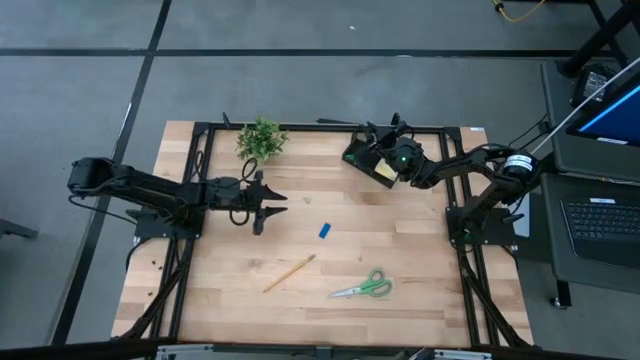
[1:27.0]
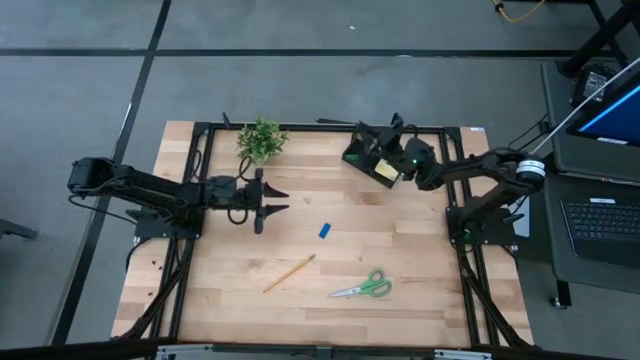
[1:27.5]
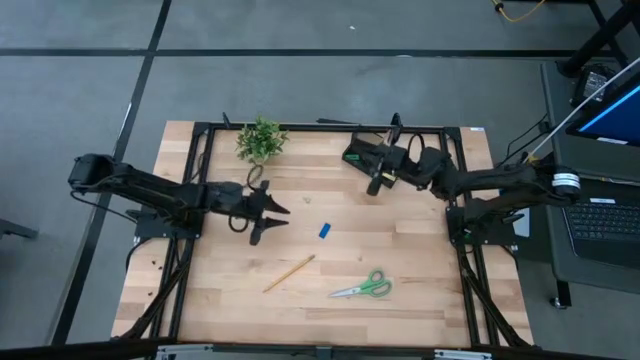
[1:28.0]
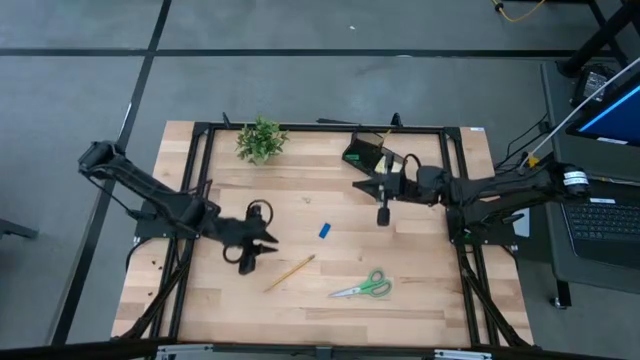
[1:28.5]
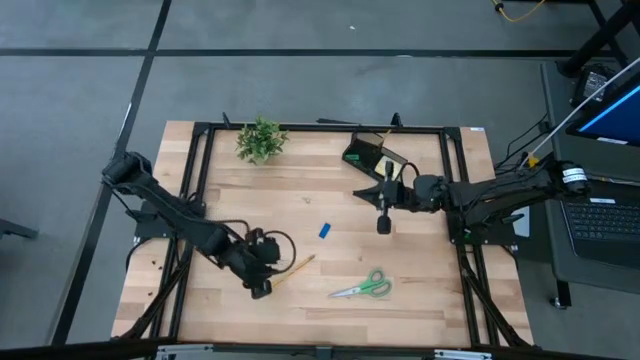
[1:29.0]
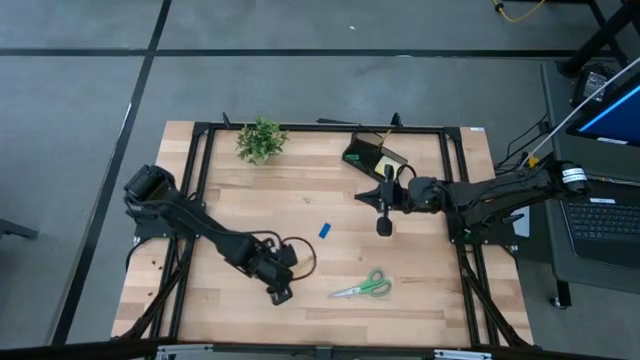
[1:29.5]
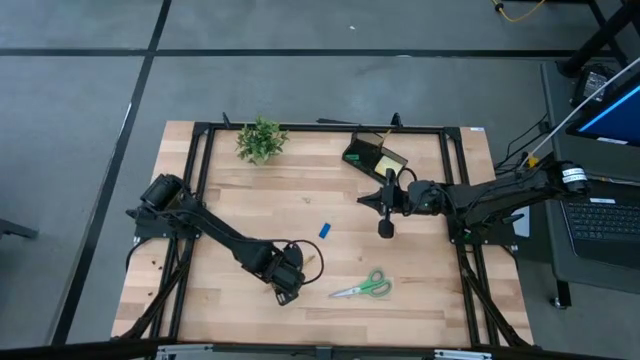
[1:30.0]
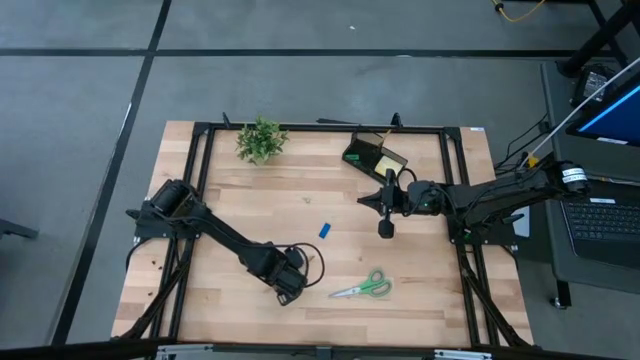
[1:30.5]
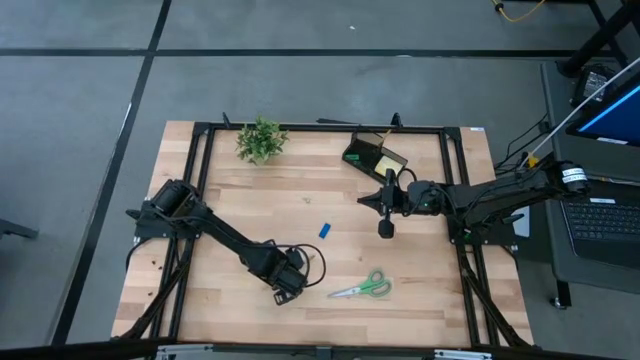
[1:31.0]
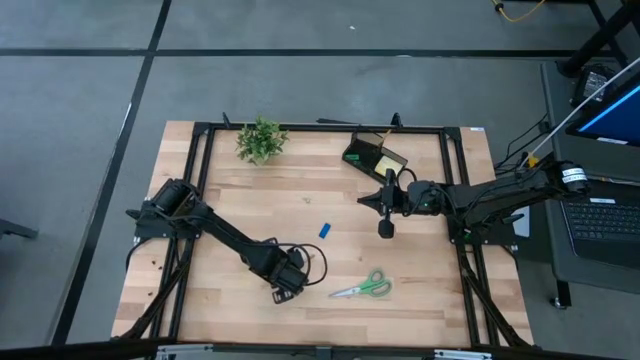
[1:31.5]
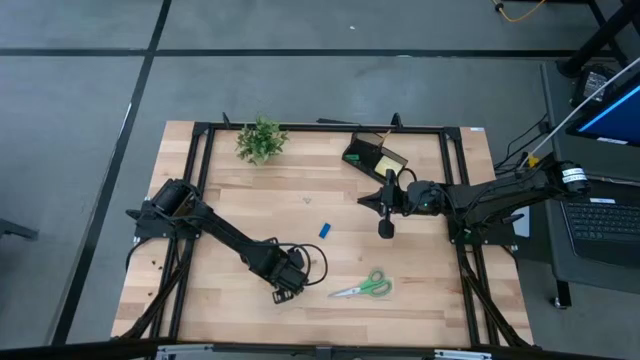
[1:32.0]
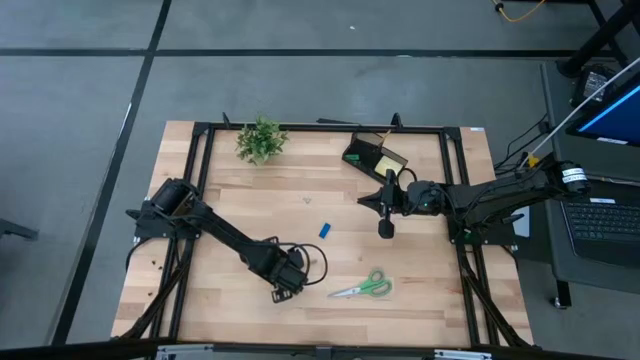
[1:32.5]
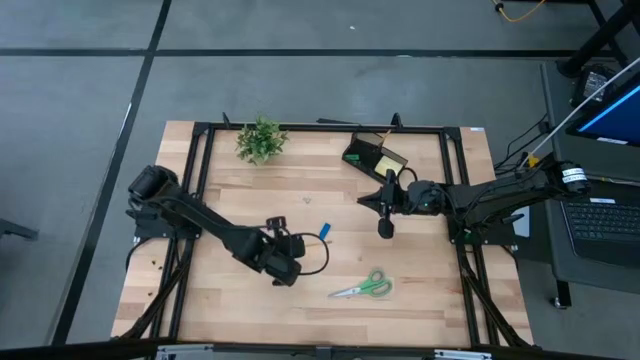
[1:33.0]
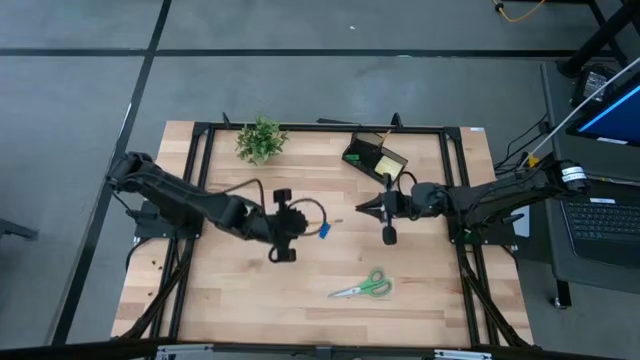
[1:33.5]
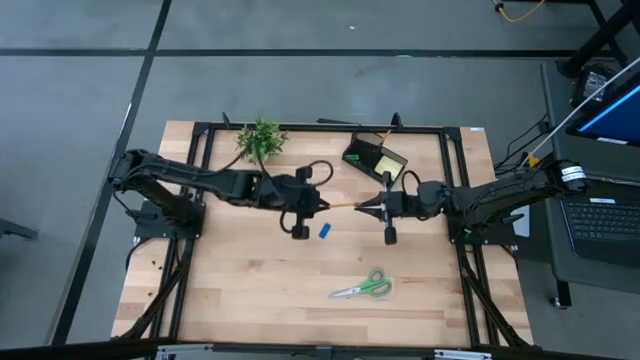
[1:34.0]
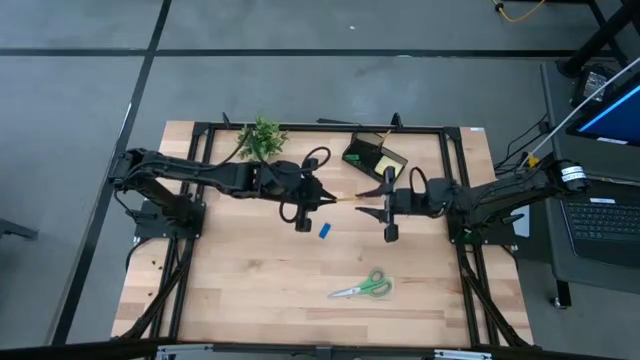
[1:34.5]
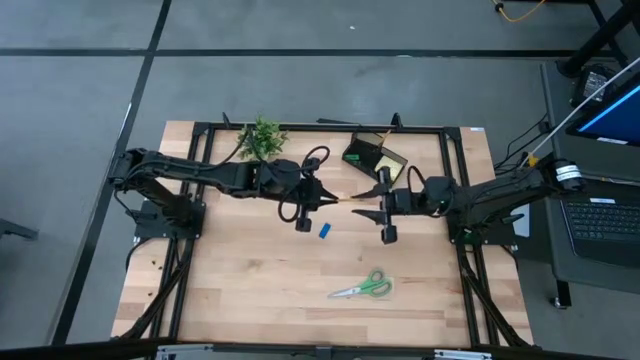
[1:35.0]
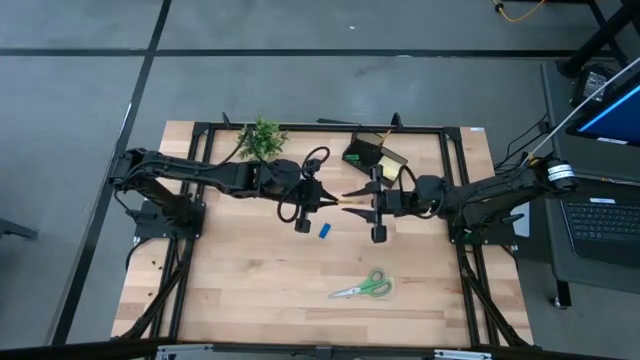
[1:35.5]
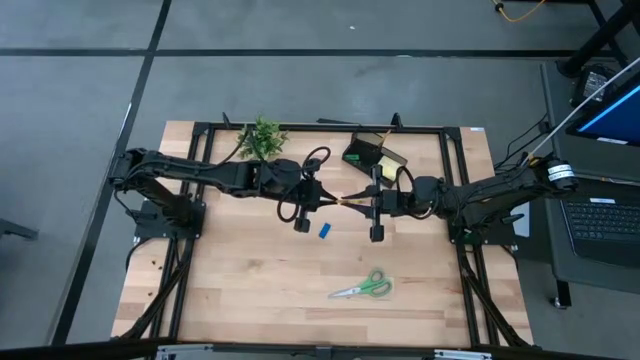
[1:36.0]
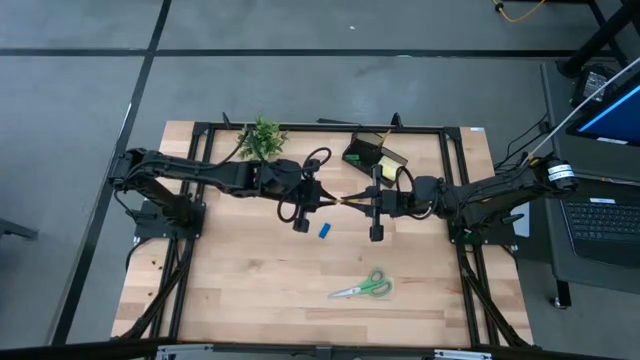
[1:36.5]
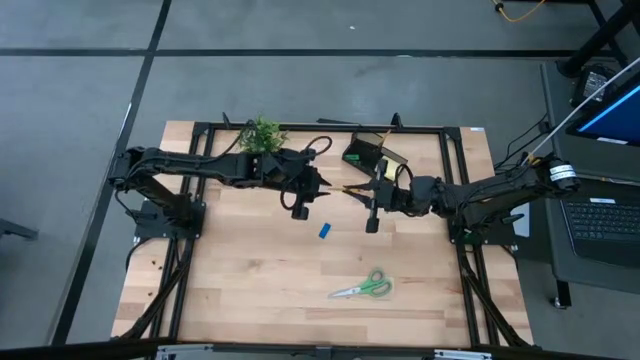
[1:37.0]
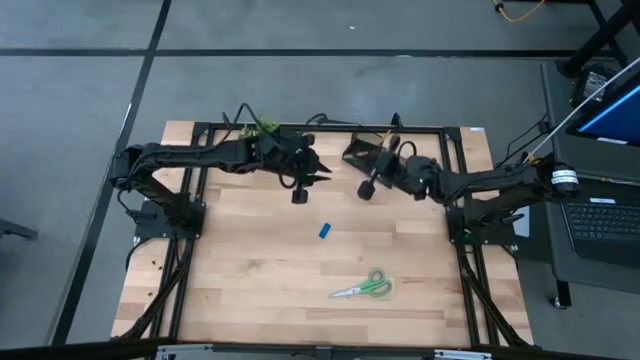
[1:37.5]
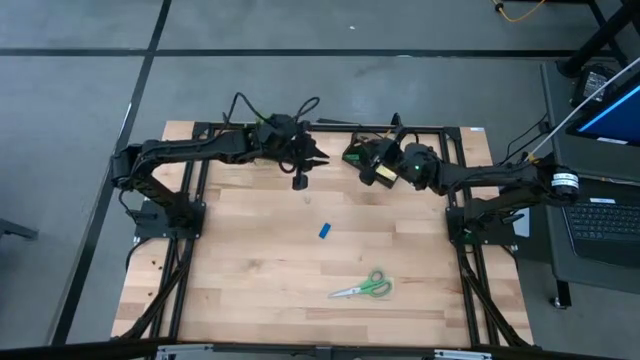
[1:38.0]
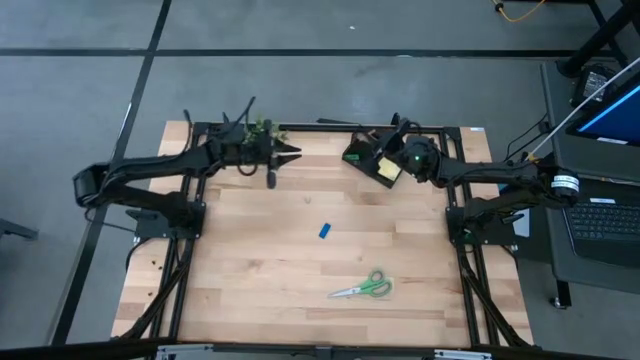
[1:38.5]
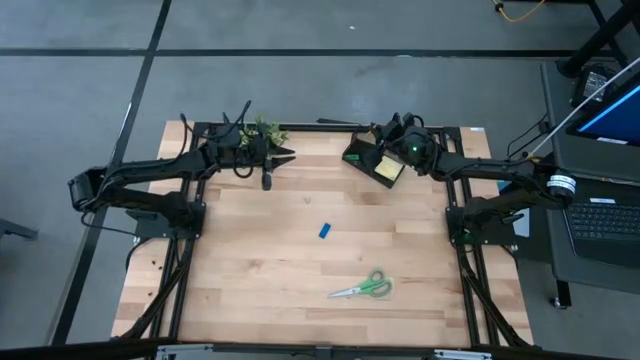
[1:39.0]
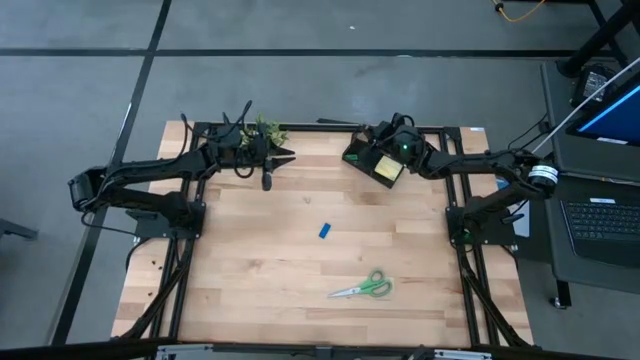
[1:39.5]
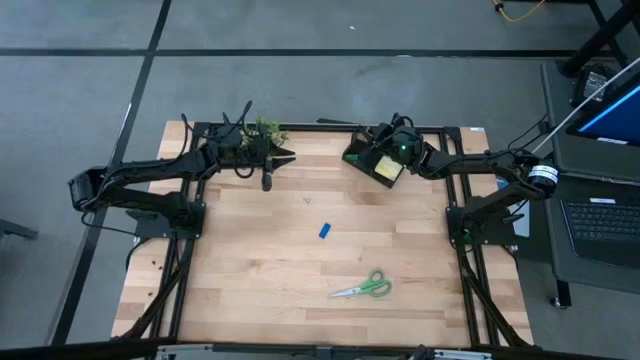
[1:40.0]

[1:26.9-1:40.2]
Task: Pick and place office supplies into organizer
Put the yellow pencil into the black desk organizer

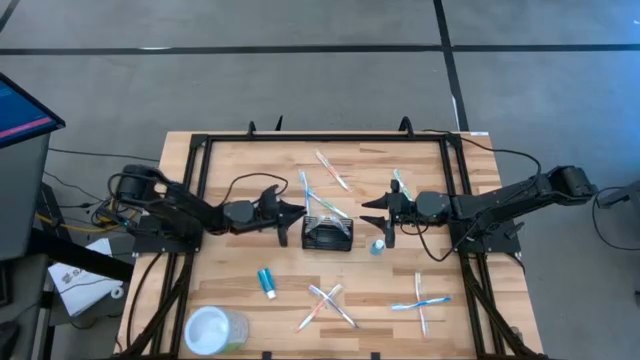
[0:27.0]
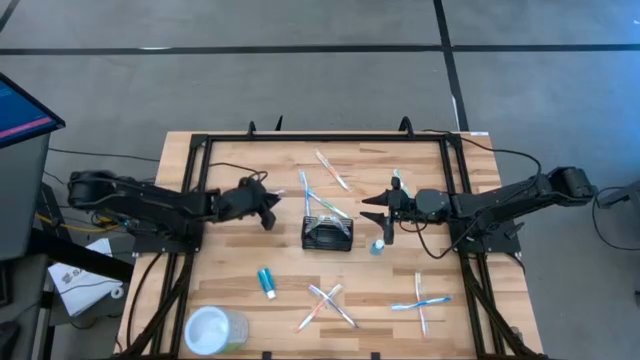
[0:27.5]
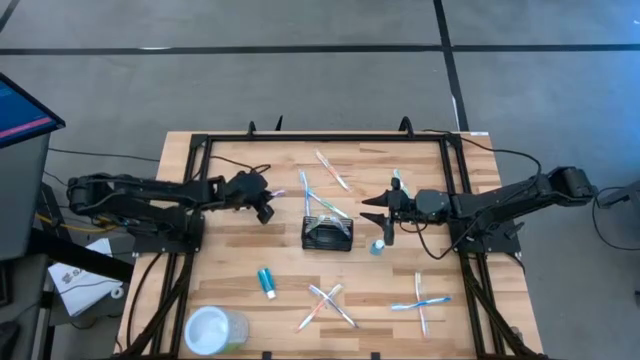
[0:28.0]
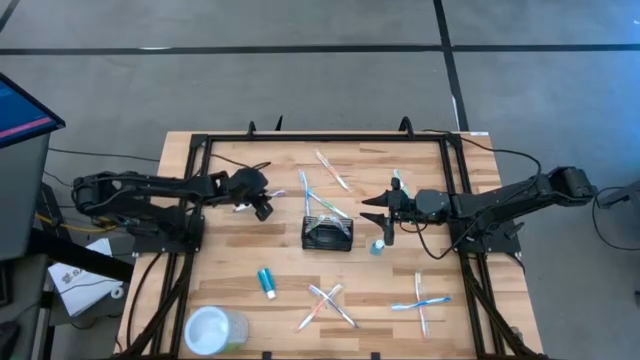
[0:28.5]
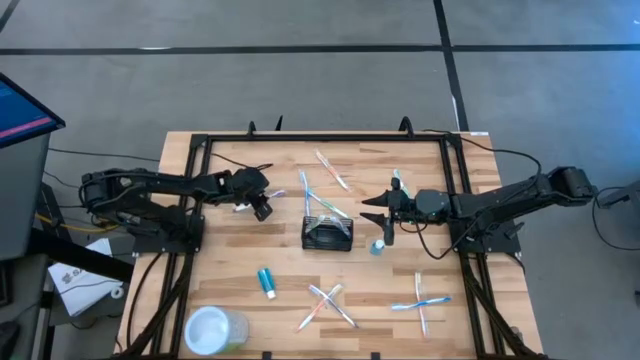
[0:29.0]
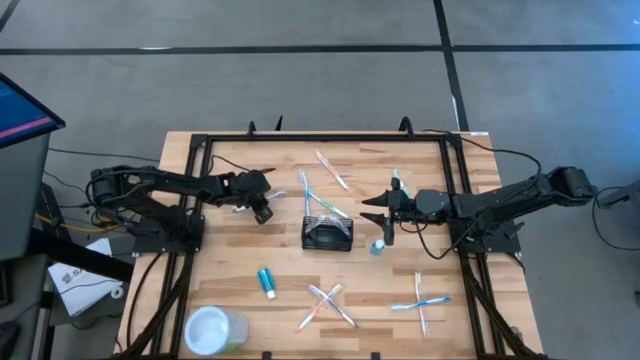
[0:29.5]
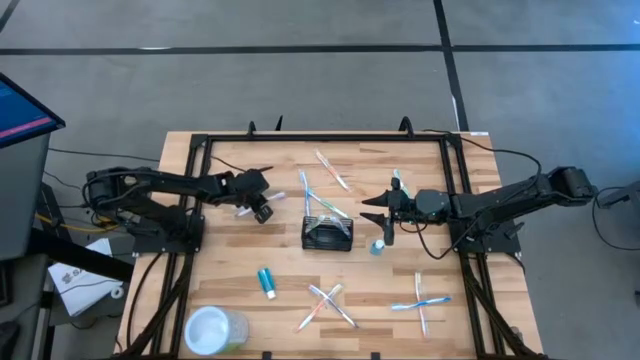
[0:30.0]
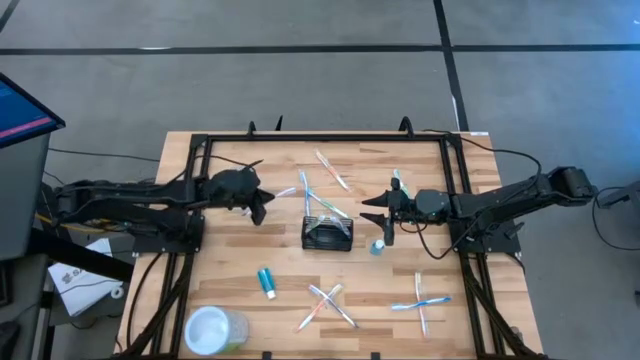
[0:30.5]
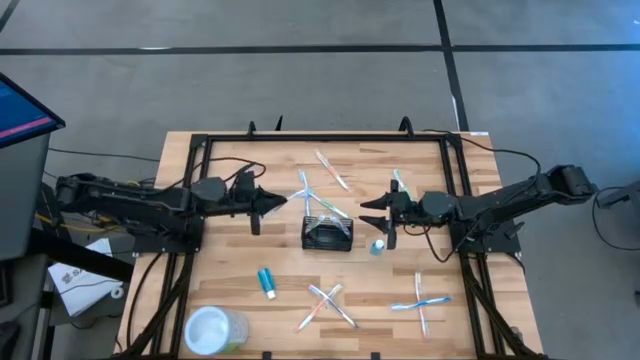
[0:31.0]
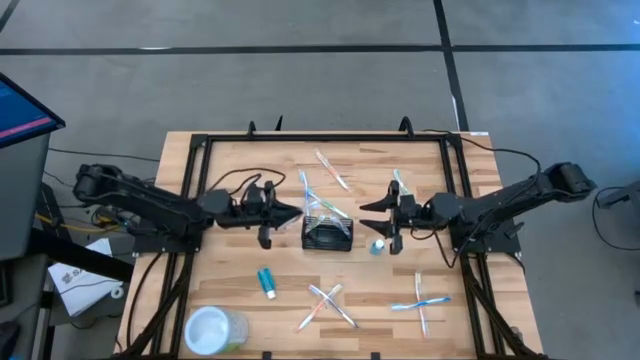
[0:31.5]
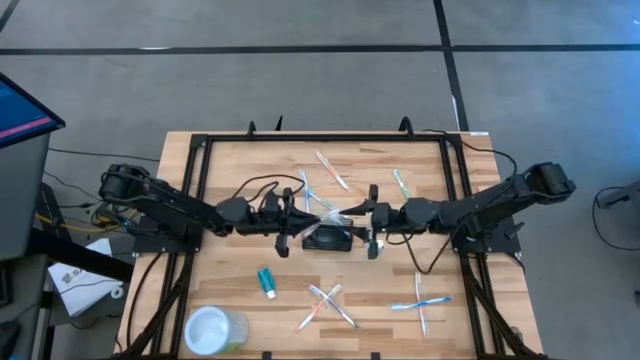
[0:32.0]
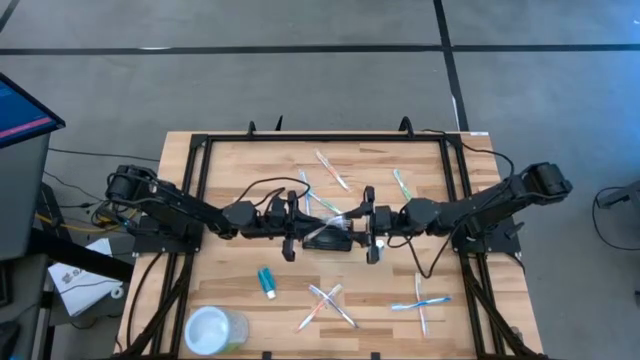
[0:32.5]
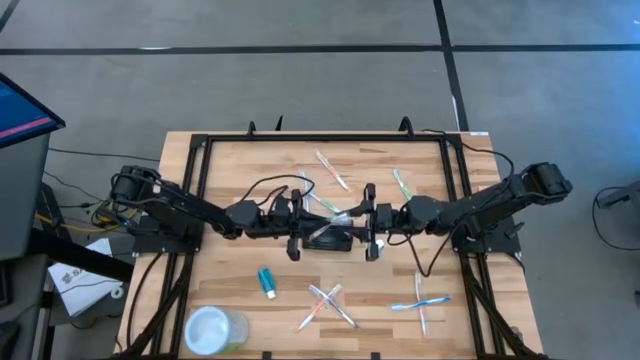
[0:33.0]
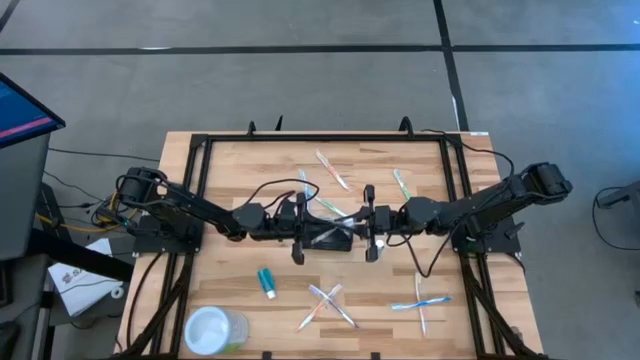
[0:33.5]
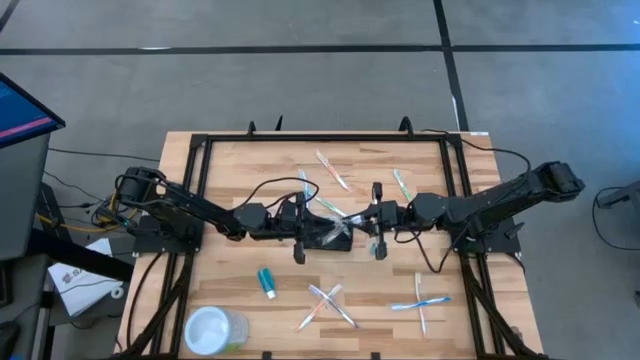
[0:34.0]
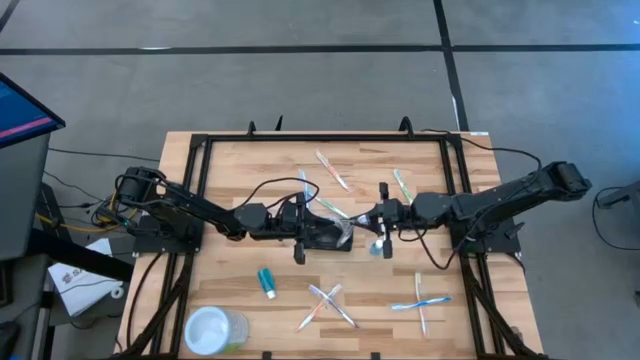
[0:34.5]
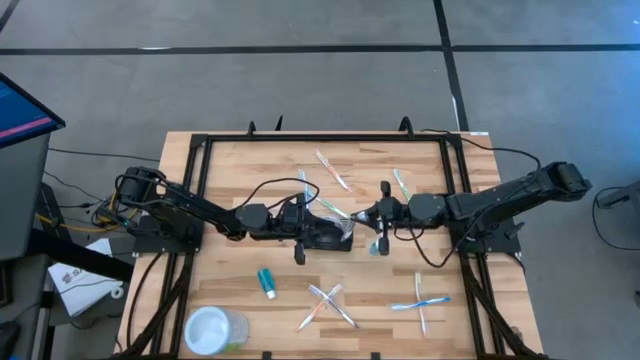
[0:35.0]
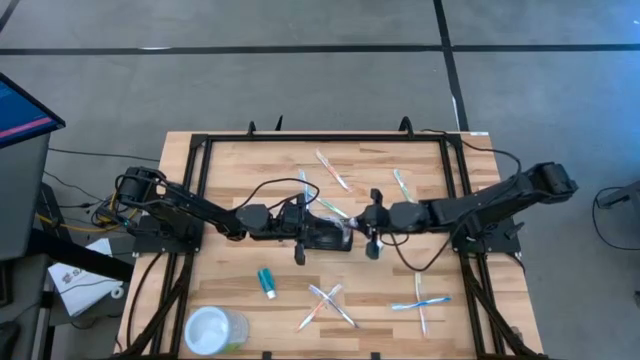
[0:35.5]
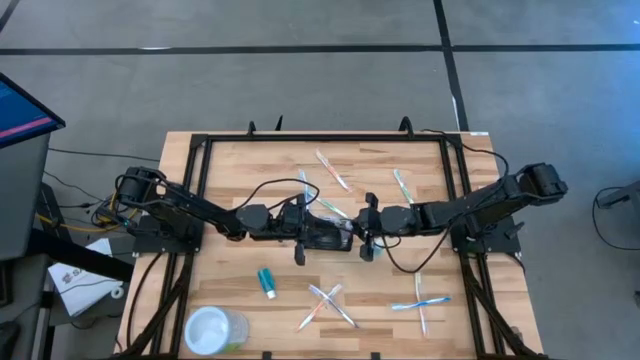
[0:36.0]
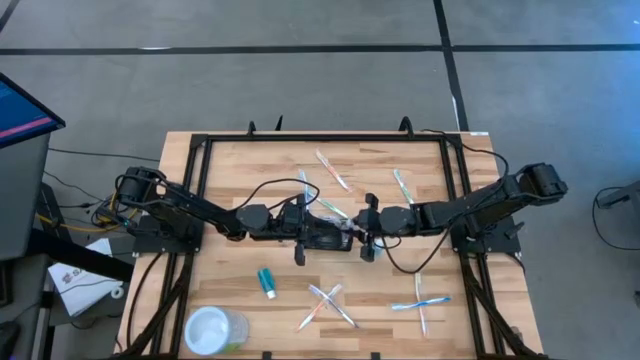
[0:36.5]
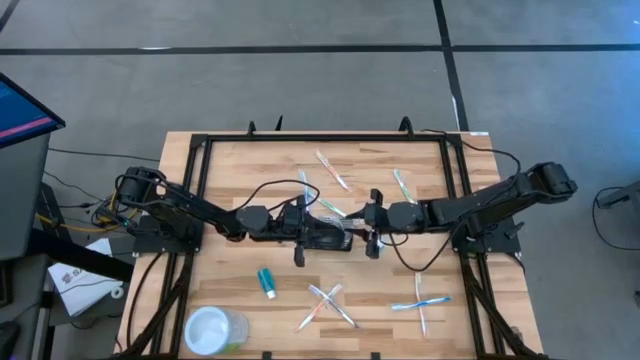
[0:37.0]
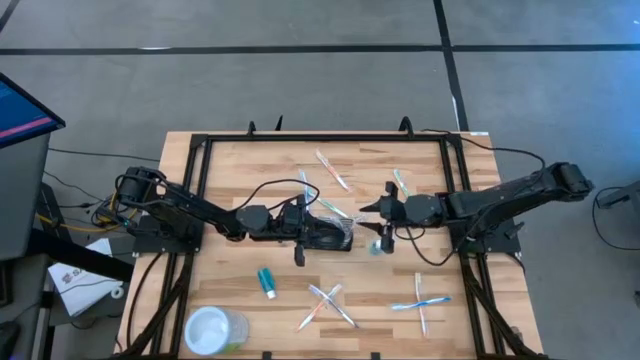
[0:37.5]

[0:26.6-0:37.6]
Task: Pick & Place toothbrushing station
Put the top purple toothbrush into the wire organizer
